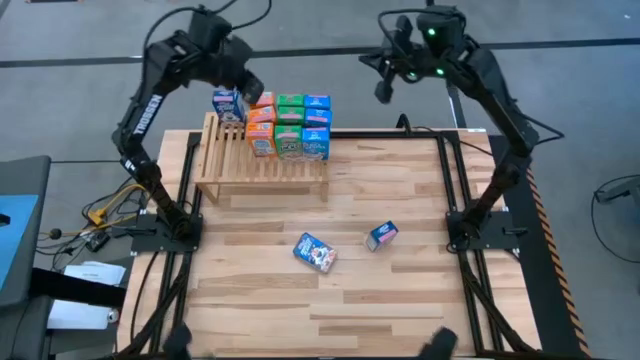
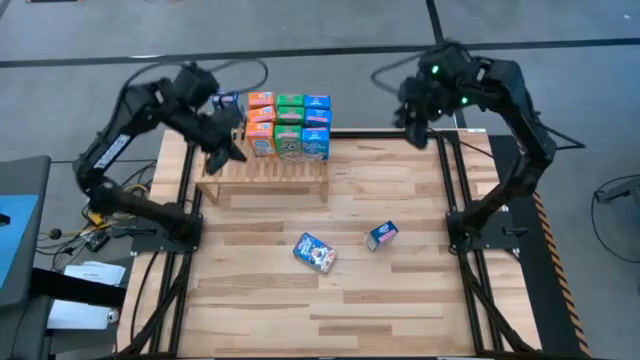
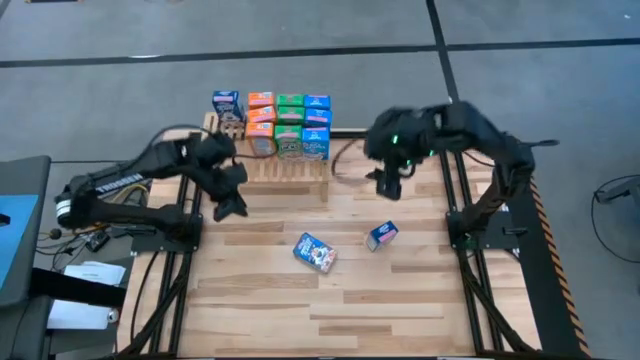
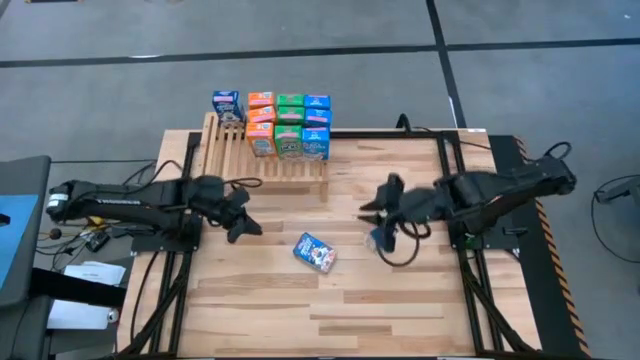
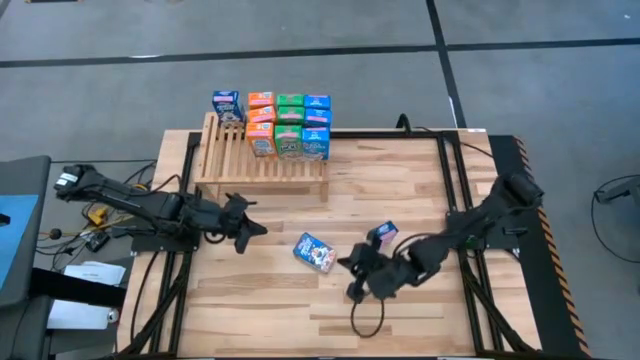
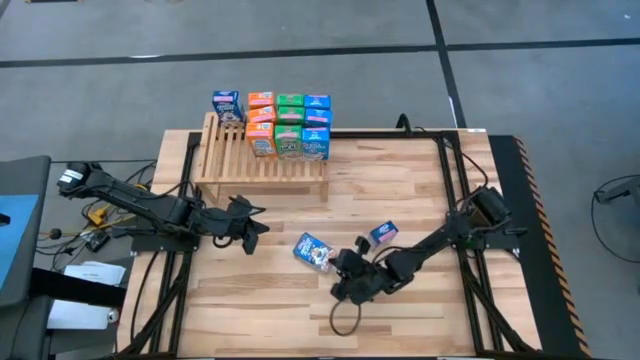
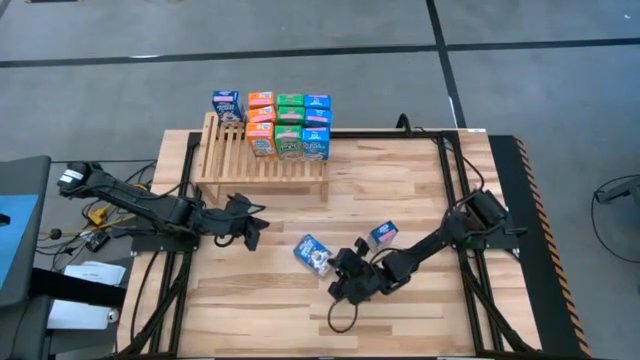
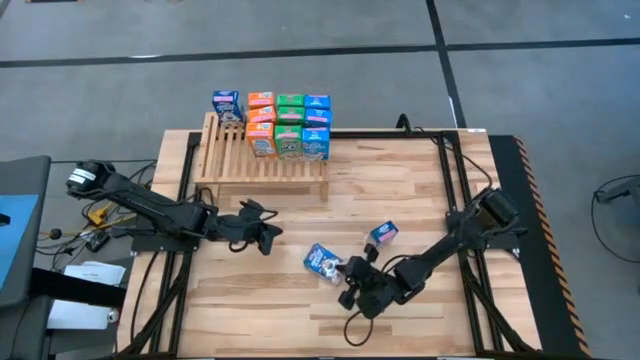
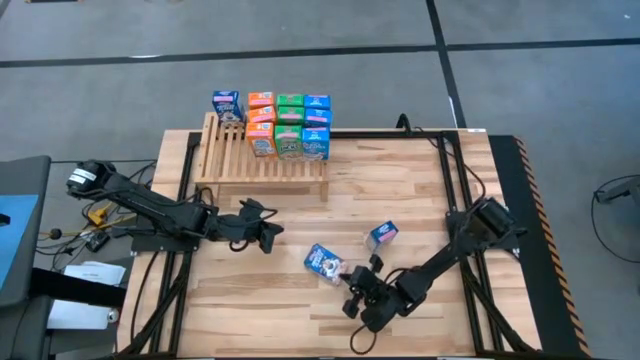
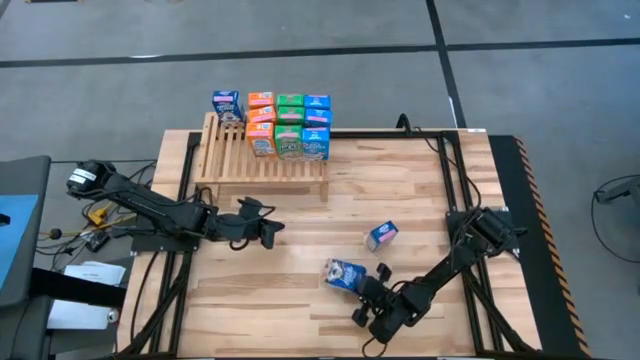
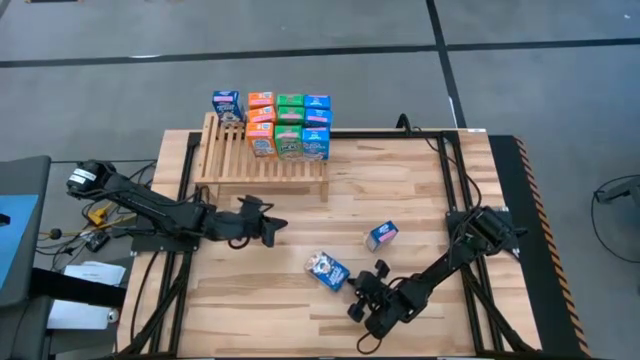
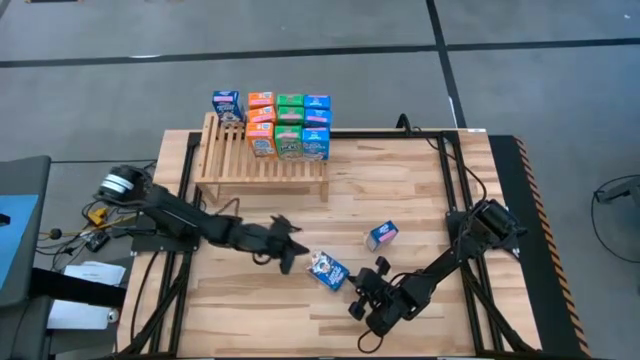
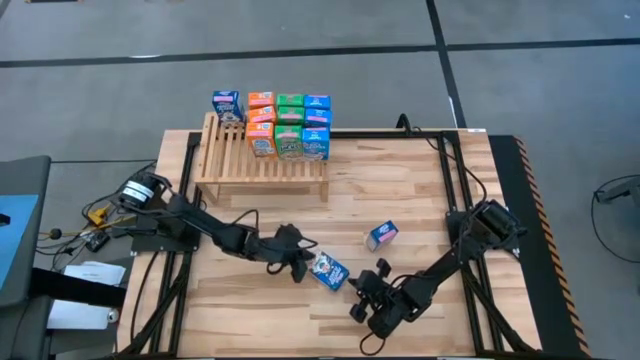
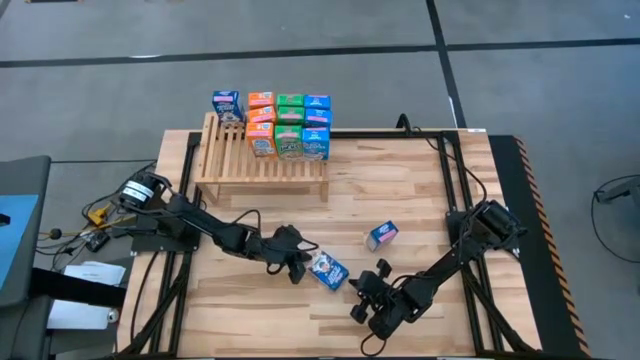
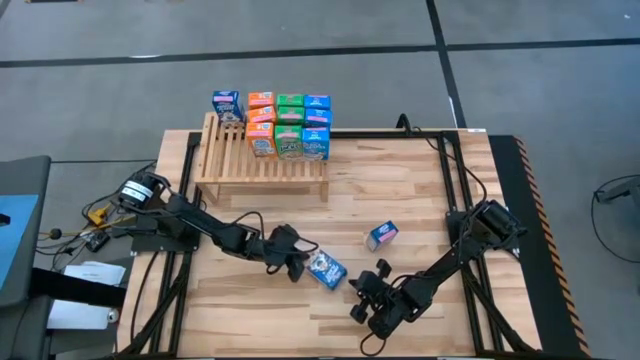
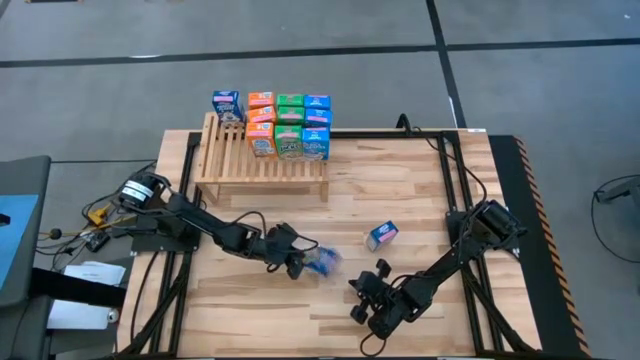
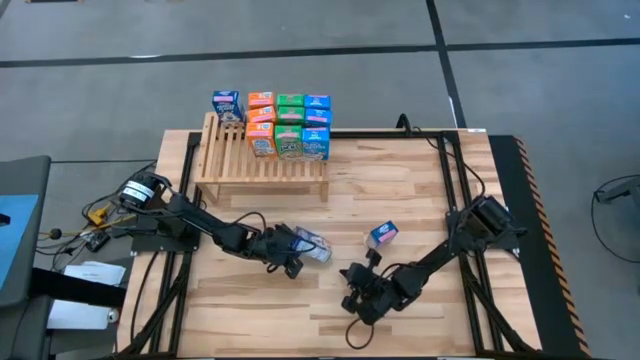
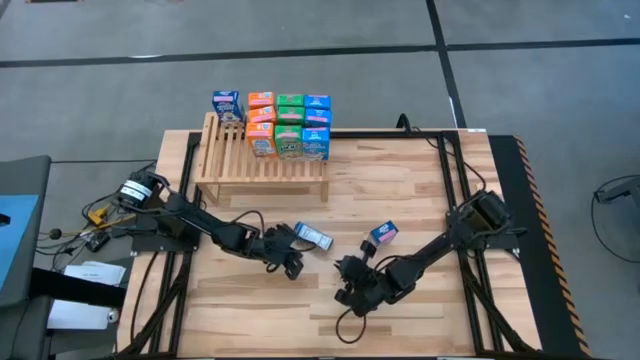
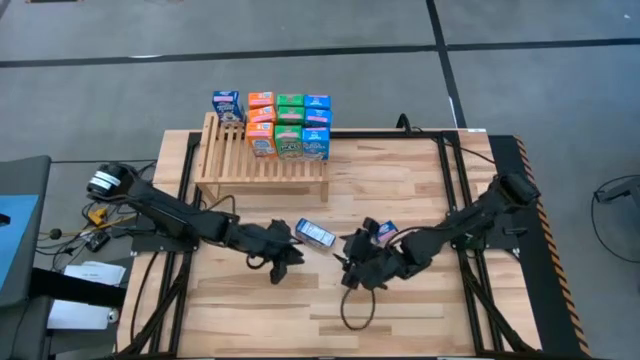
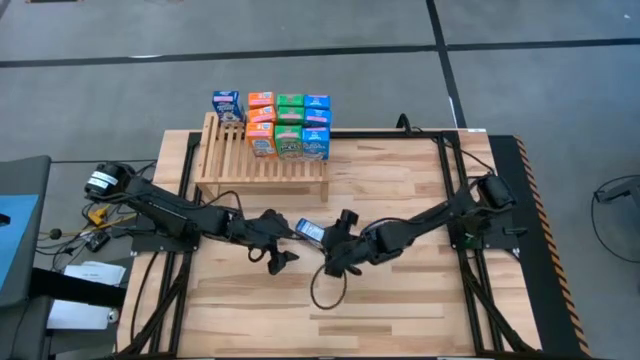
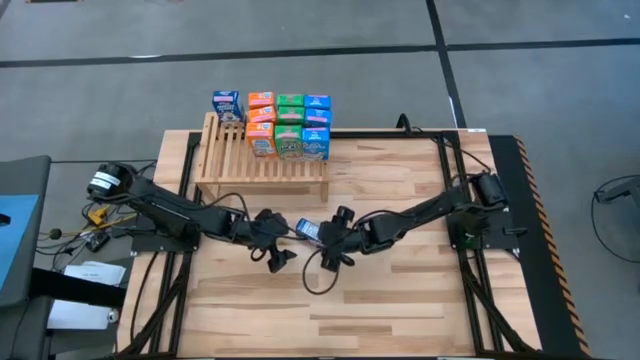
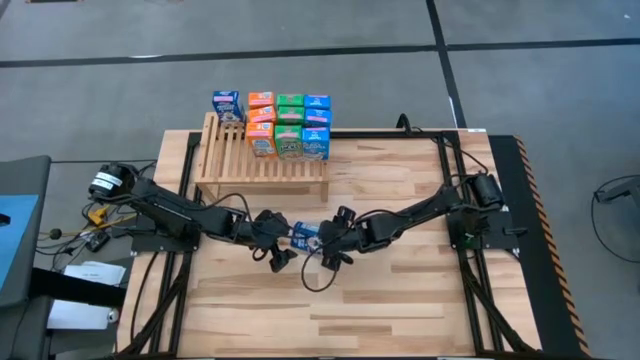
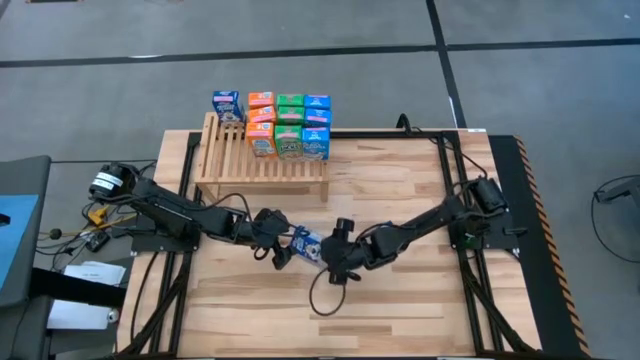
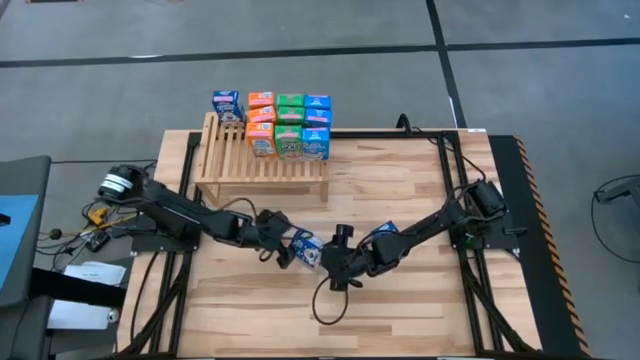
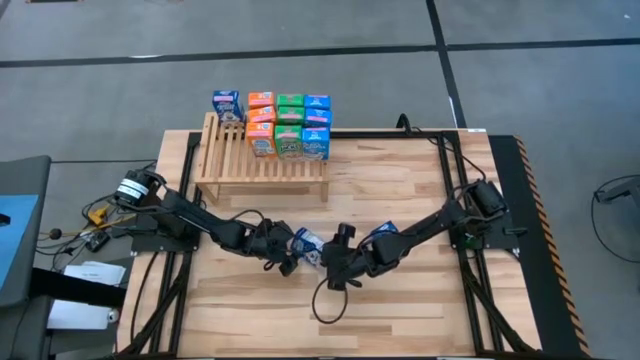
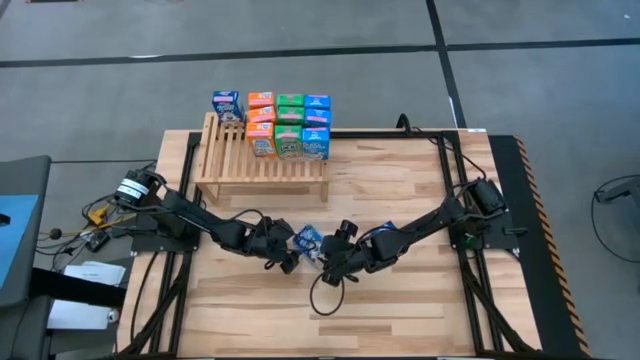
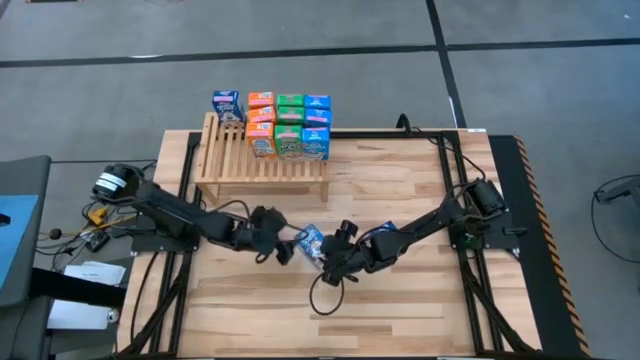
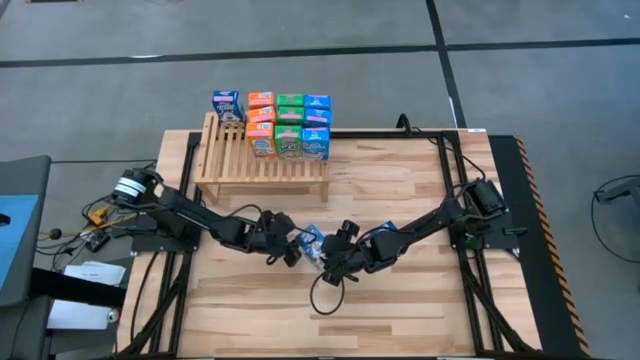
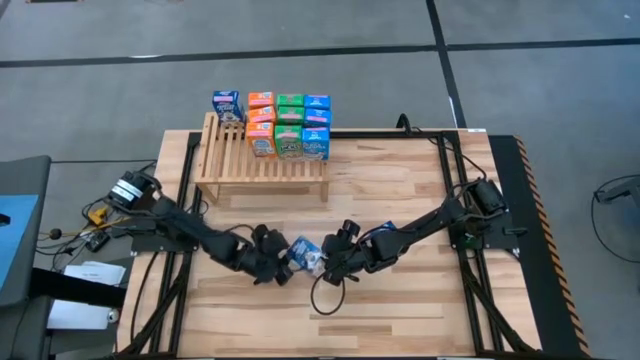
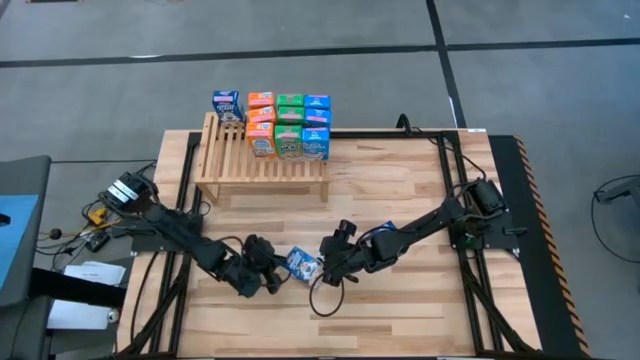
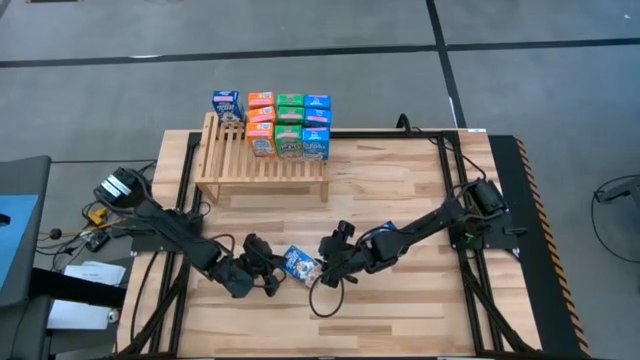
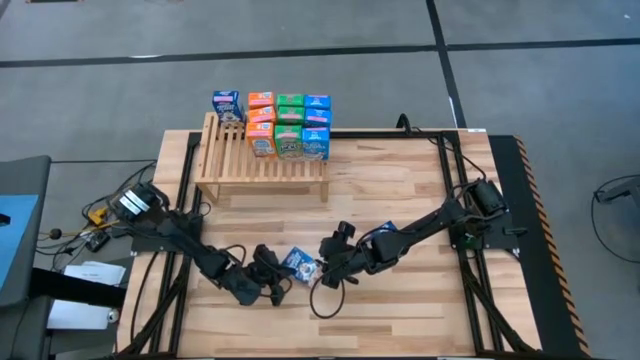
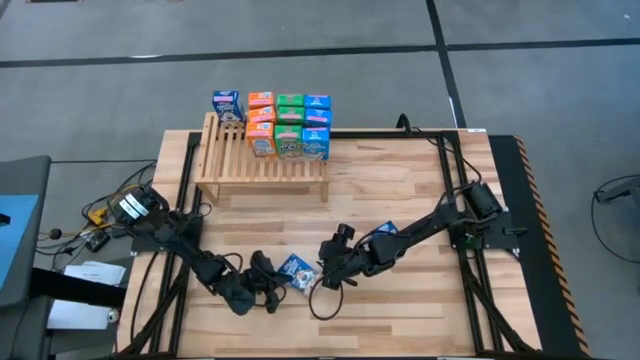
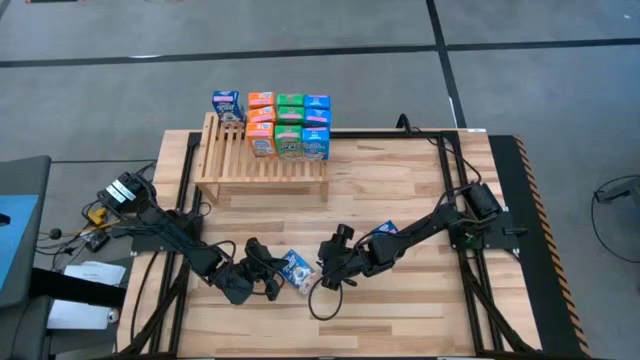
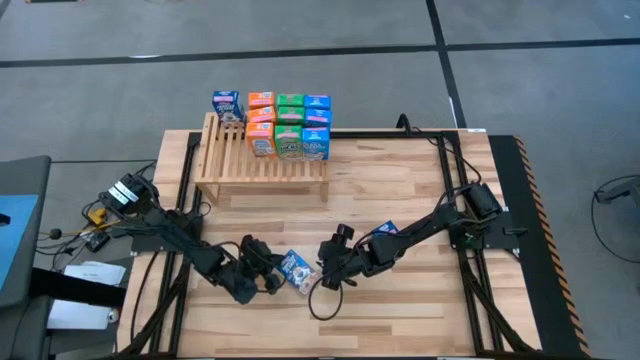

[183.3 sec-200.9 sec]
Task: Stack cereal on shelf
Put the left blue cereal on the shelf

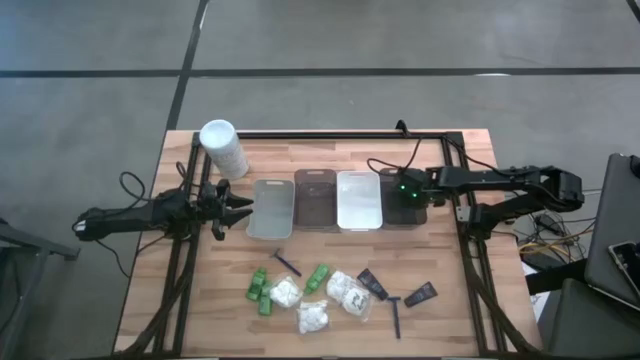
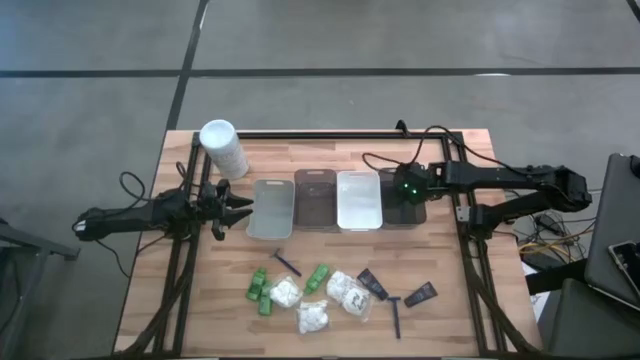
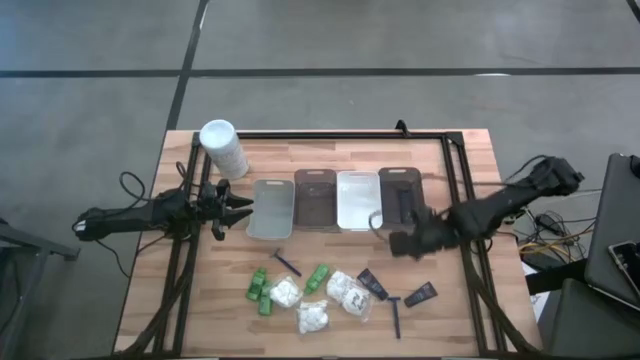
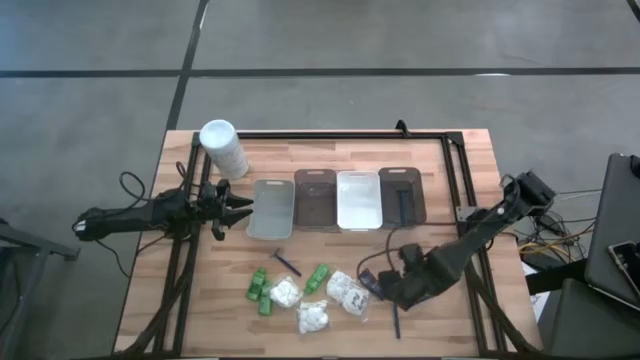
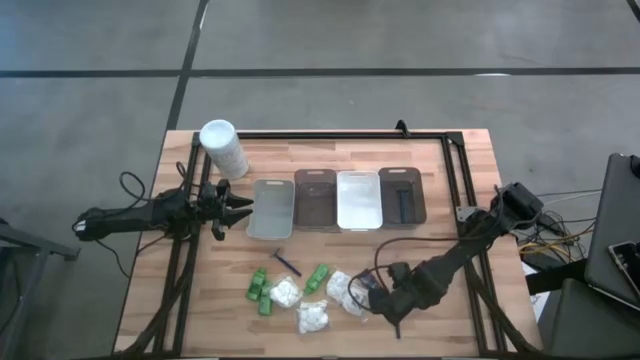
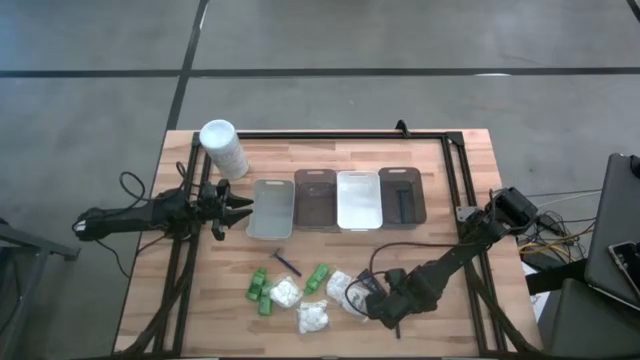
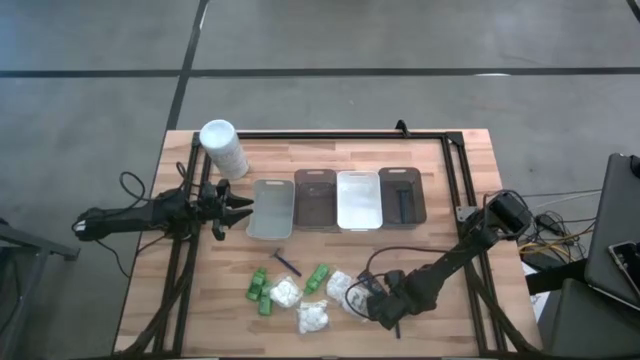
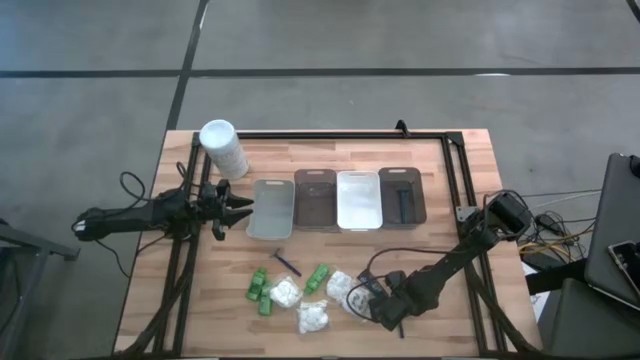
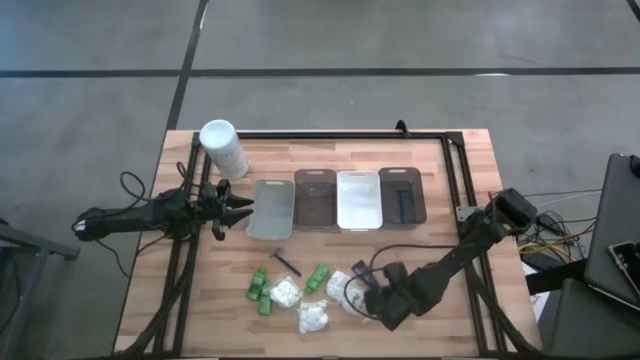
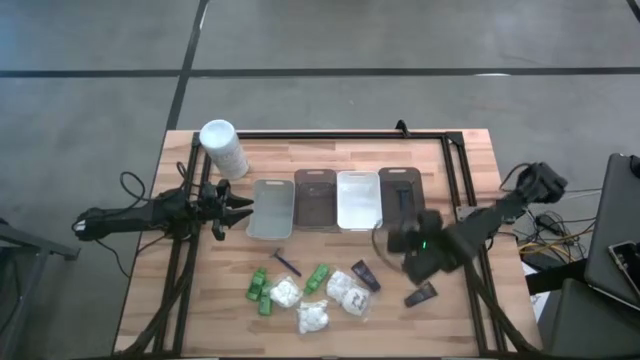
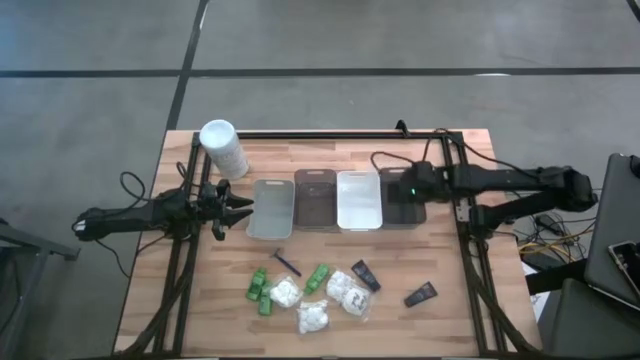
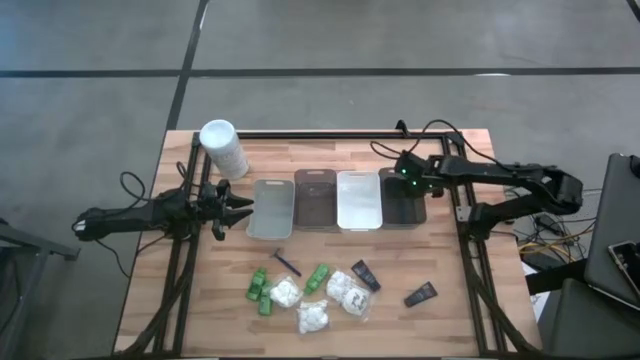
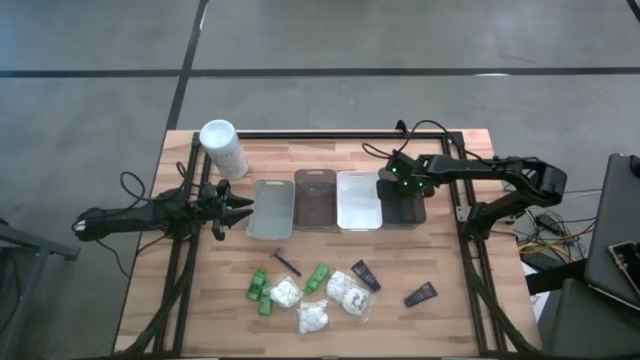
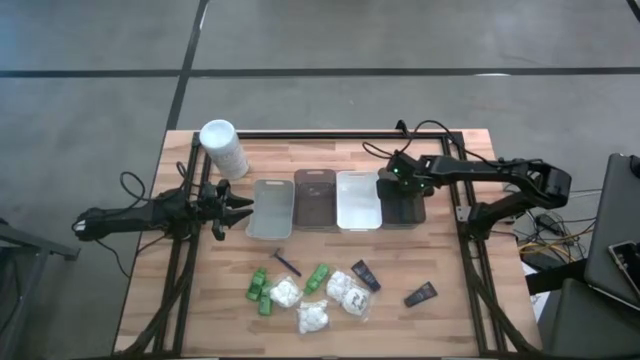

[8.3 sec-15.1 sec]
Task: Pick & Place Travel size toiletries
Put the bottom blue razor into the right black bin
